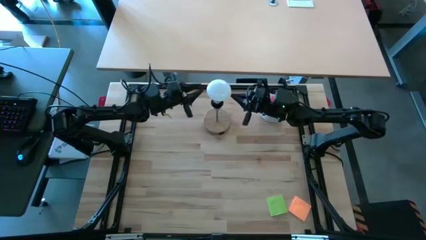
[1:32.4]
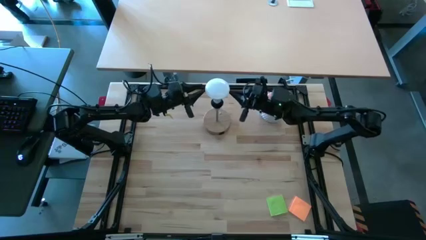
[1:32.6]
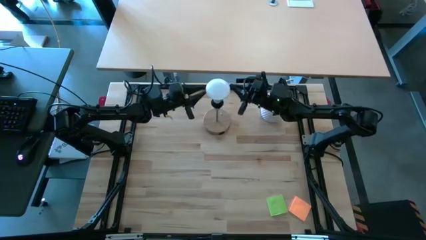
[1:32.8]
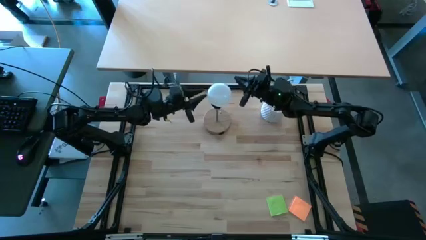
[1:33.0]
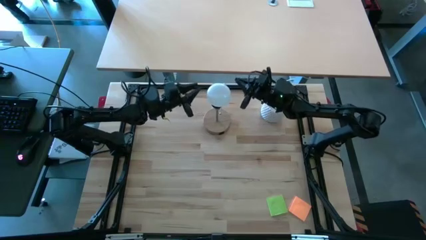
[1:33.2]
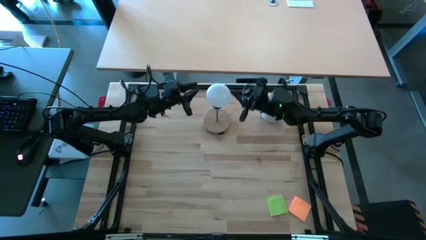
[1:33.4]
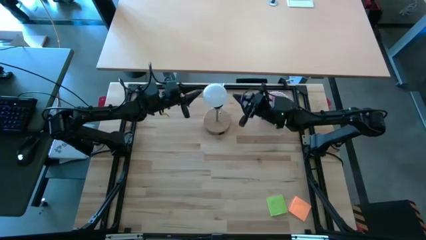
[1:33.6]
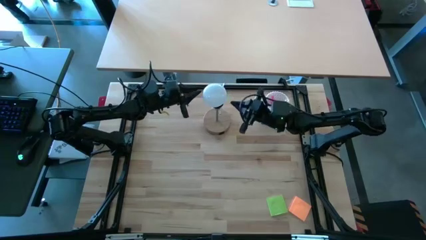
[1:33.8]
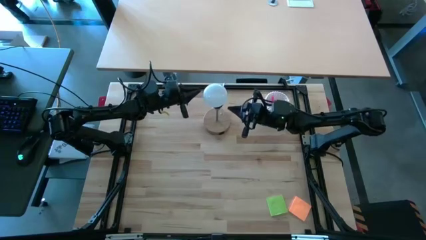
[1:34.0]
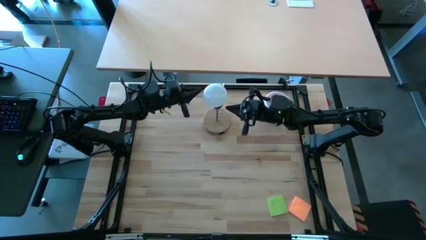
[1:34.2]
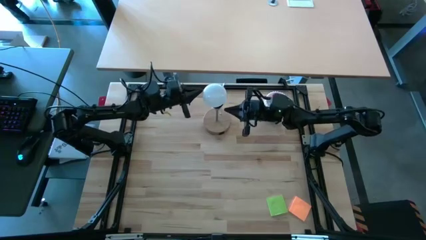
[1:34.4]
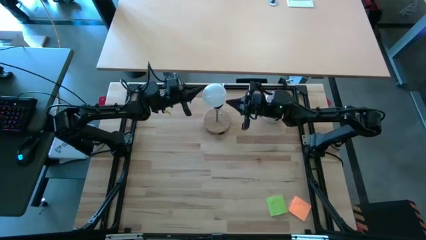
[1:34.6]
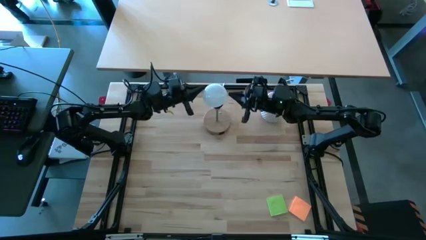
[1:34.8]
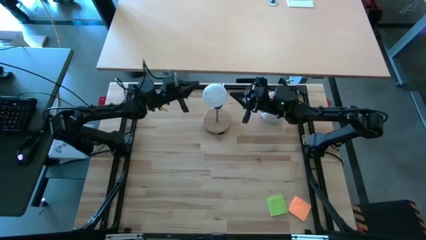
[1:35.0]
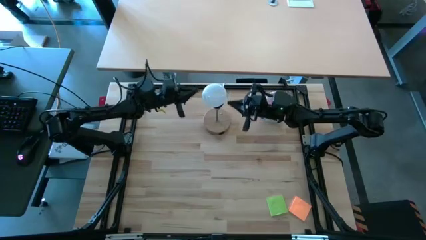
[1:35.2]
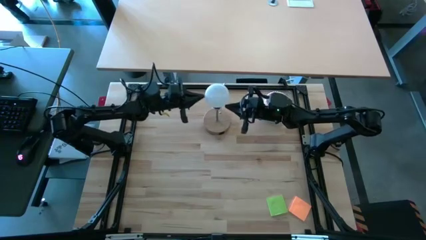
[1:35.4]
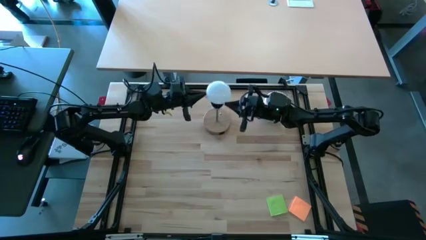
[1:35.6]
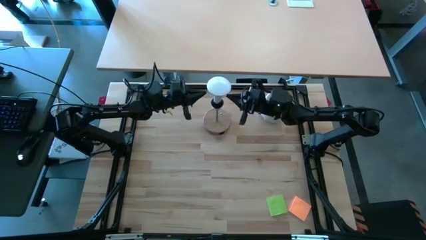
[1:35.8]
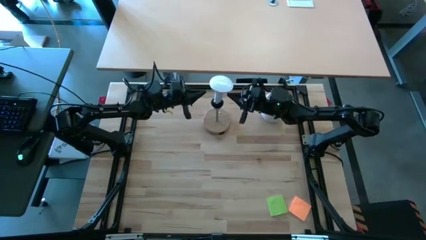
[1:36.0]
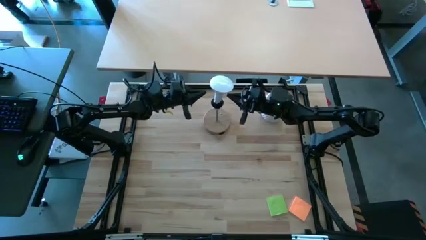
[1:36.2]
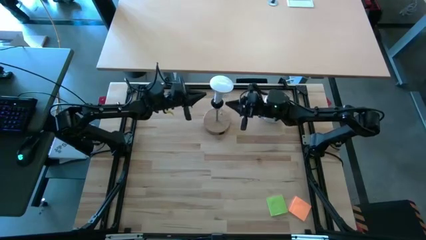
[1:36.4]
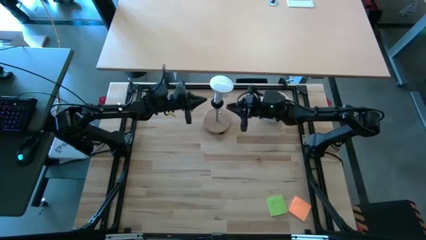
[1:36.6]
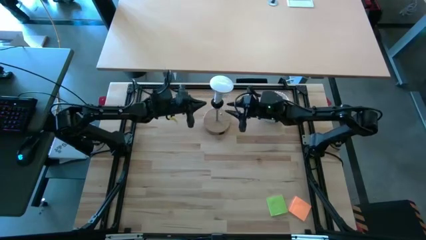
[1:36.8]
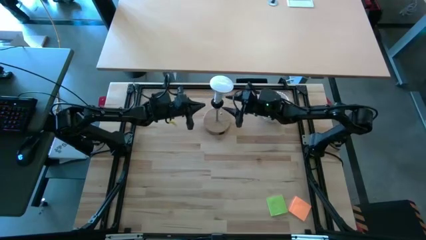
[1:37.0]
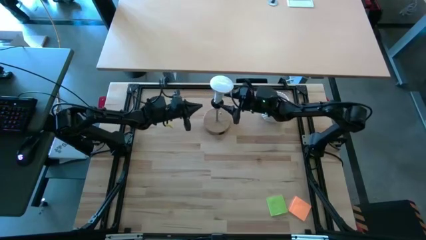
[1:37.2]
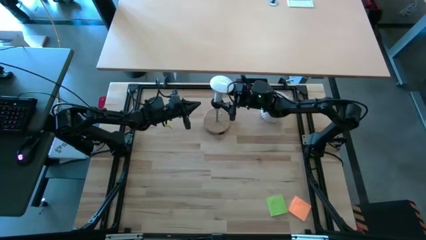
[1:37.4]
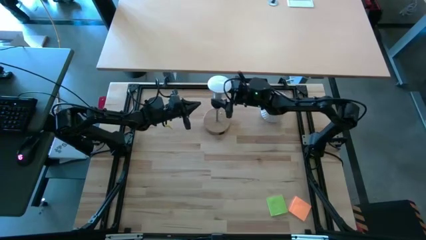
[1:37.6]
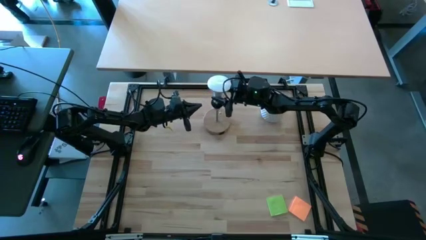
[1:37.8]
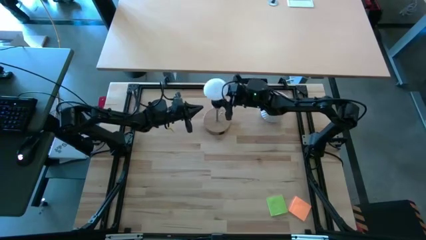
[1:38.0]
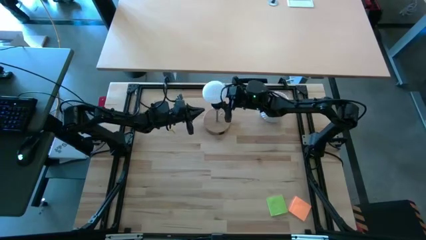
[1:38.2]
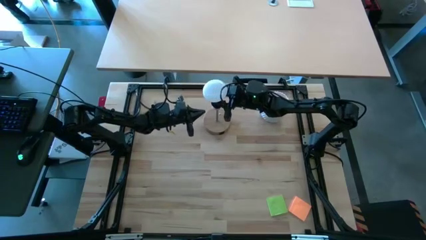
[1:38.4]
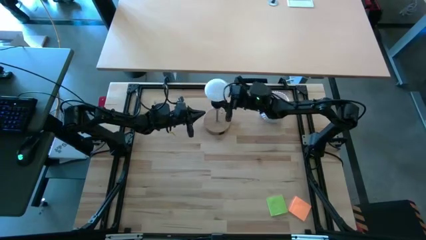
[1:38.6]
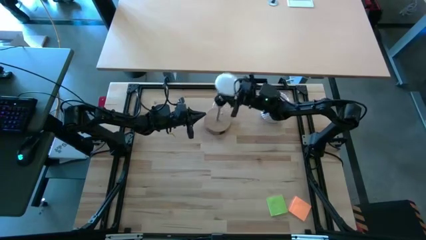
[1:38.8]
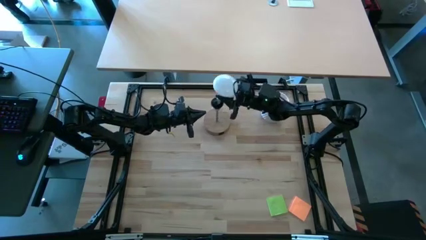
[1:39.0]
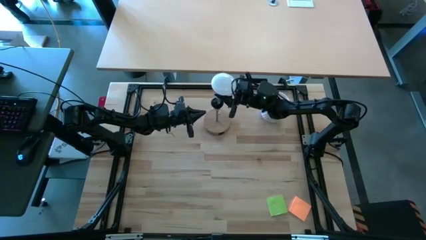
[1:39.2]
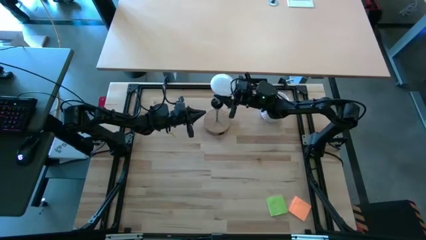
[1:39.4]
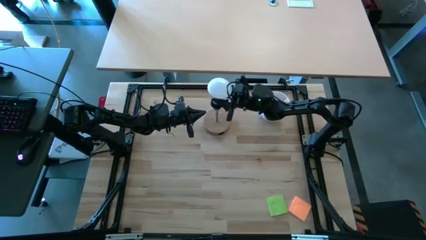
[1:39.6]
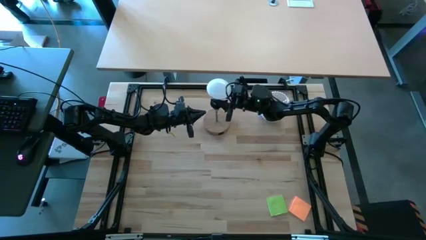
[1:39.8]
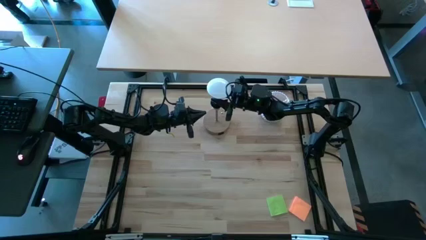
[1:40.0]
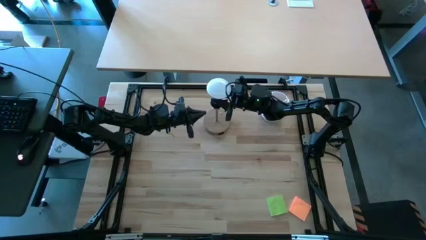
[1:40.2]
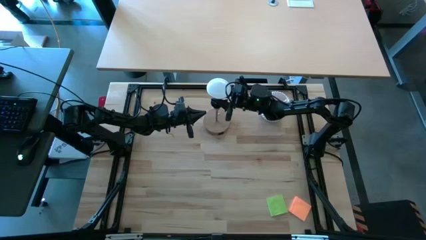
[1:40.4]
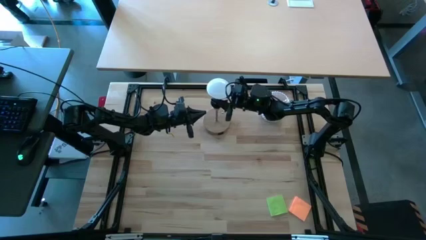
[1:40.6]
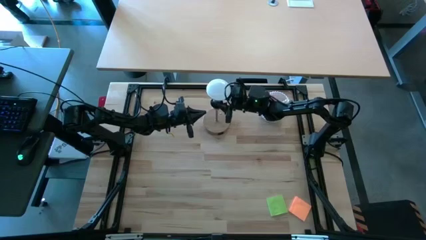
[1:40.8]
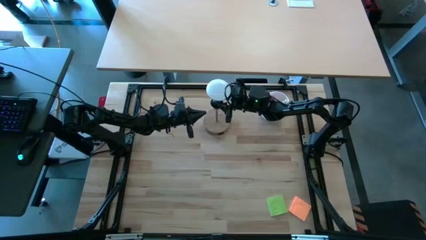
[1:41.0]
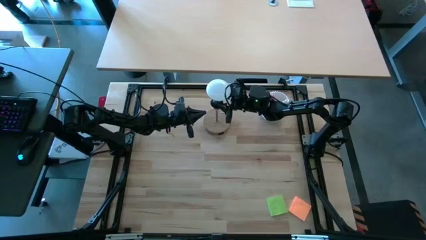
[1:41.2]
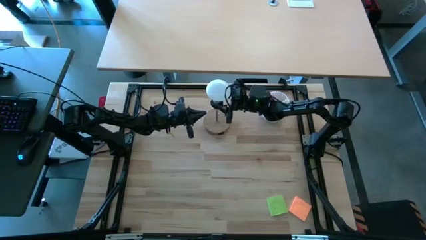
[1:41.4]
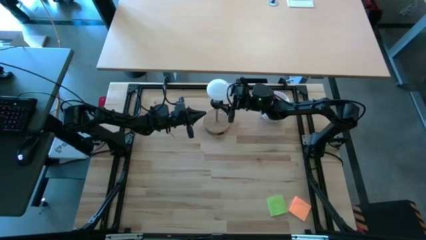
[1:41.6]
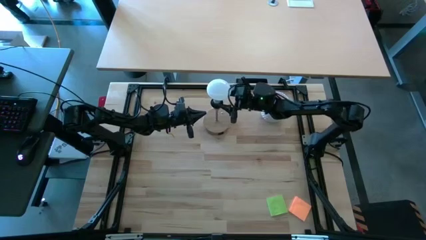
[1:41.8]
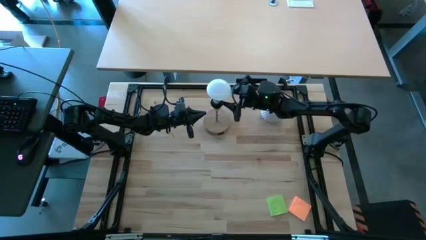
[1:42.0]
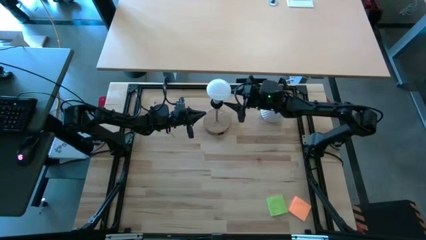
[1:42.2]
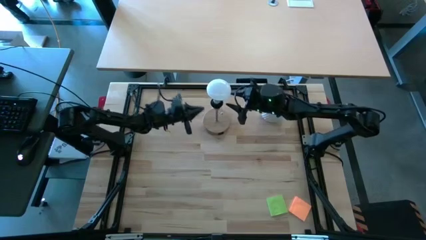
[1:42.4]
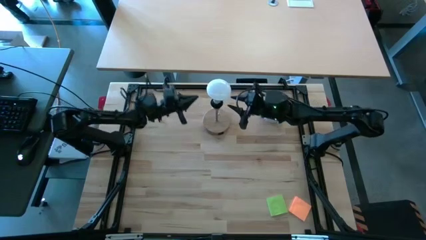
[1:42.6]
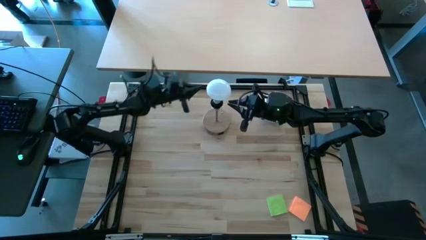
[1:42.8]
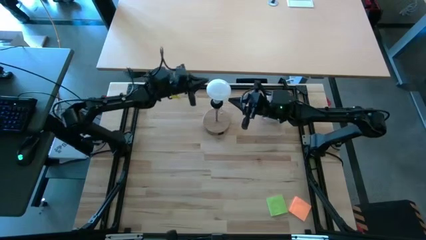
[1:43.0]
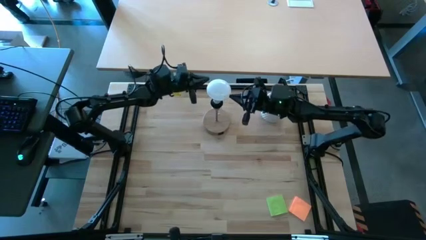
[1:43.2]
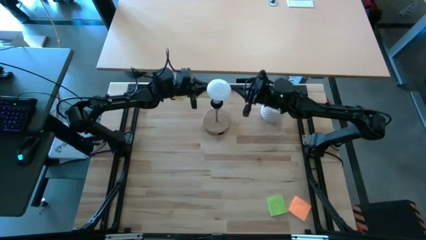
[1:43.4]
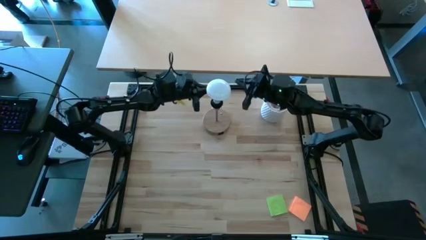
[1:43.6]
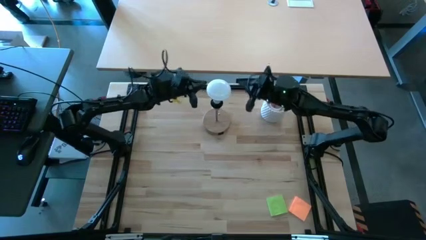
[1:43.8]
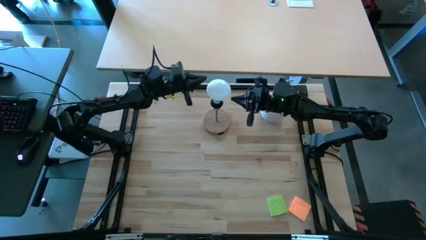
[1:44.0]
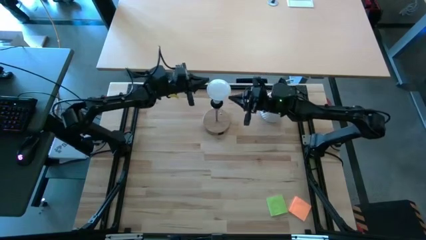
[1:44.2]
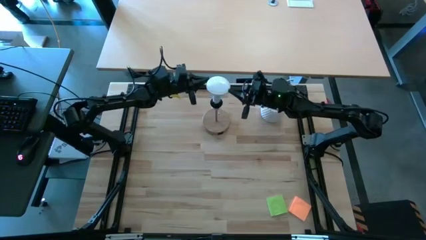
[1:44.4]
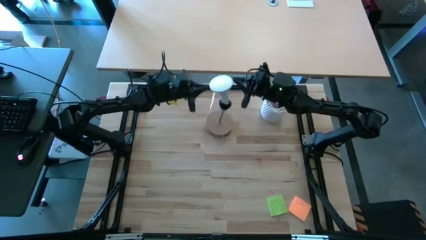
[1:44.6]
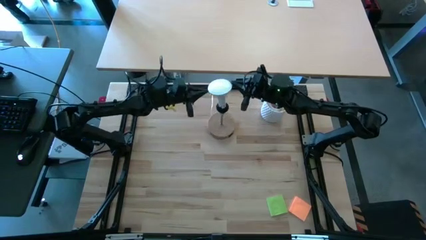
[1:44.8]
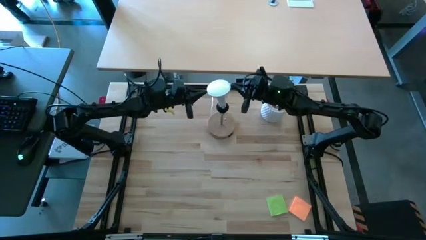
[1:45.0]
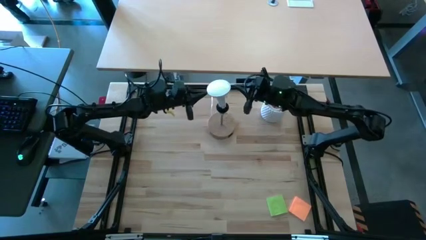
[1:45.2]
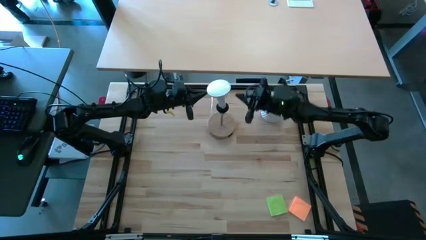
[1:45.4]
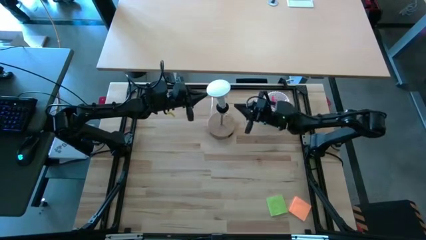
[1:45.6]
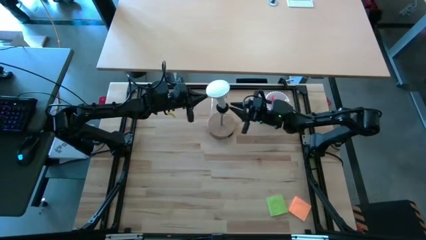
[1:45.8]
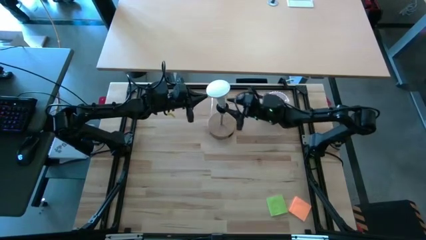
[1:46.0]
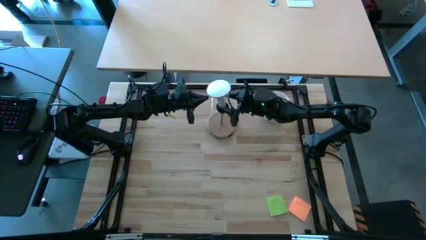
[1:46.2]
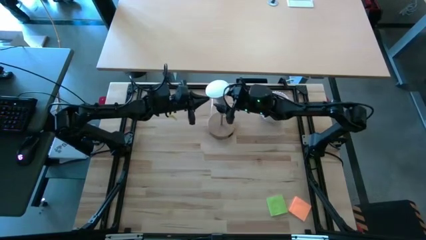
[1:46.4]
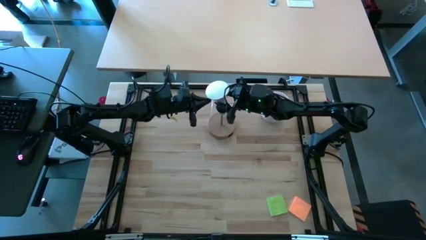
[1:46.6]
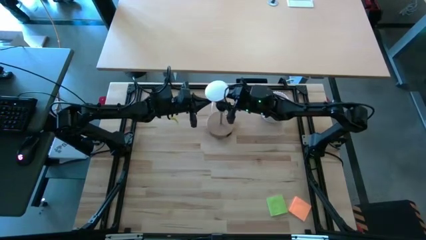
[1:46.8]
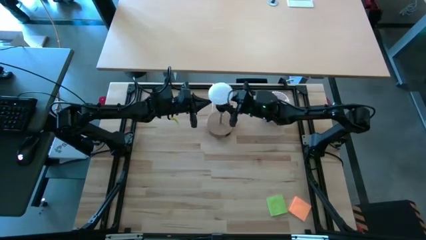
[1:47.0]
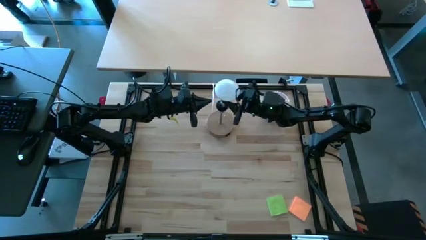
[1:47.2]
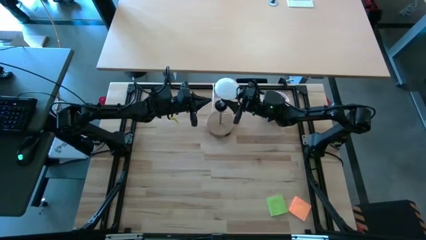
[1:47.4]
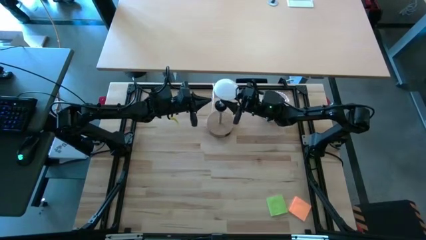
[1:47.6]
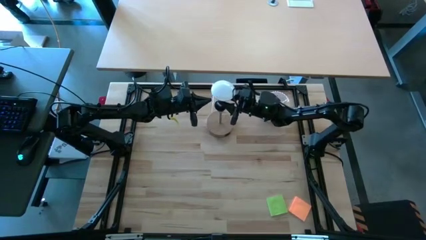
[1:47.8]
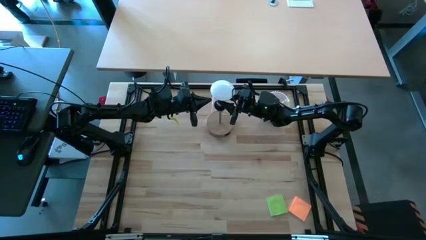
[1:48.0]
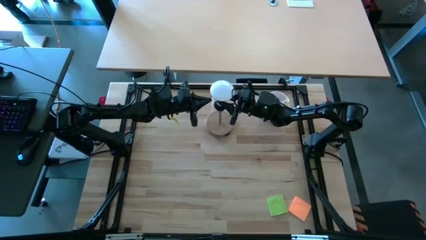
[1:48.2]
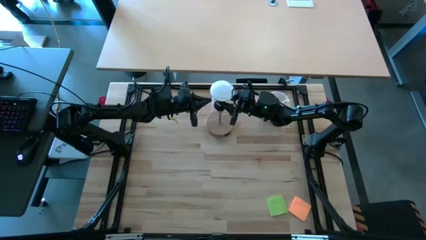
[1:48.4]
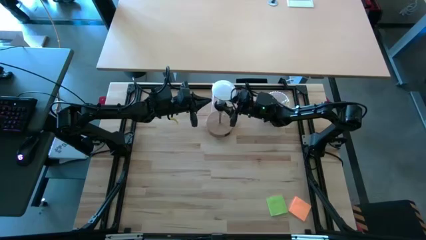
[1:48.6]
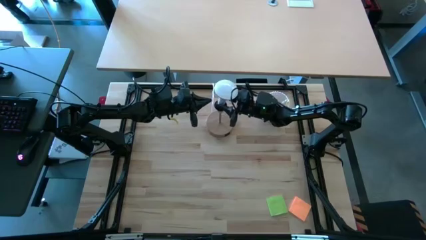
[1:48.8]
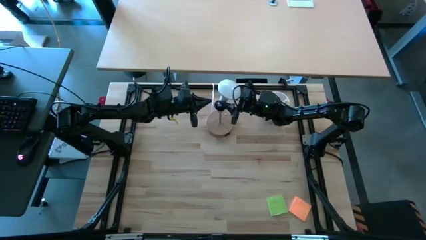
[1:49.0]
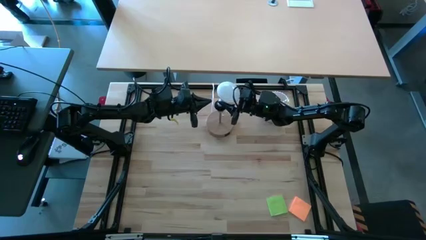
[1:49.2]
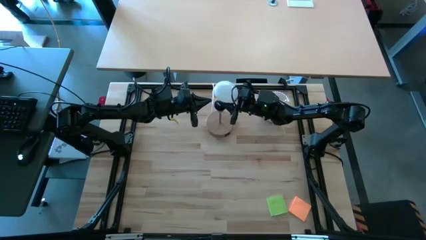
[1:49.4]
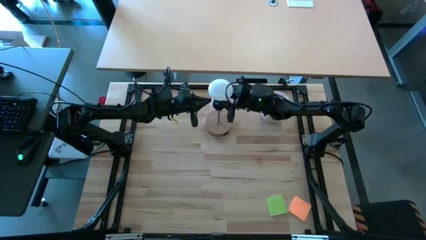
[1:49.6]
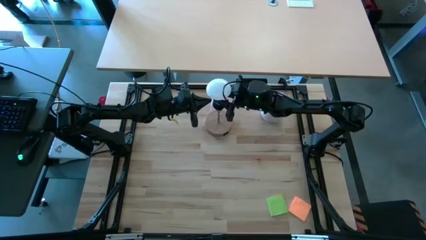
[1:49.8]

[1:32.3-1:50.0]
Task: Screw lightbulb
Insert the lightbulb into the lamp
